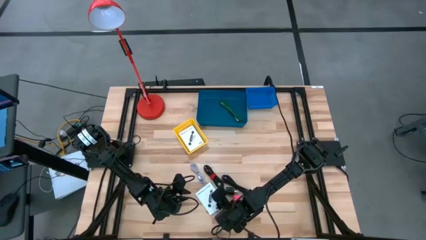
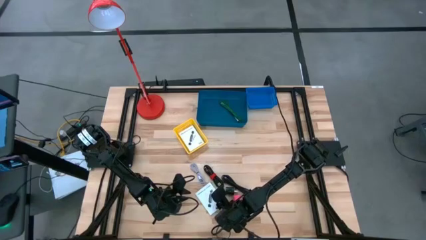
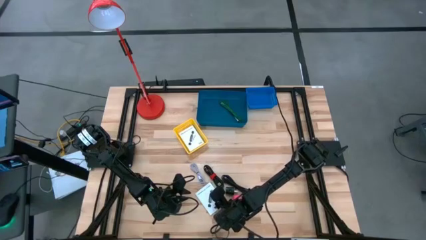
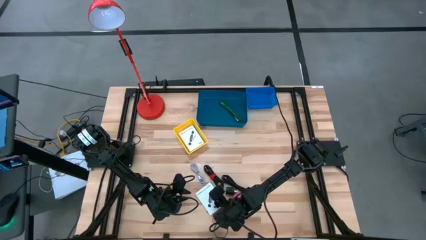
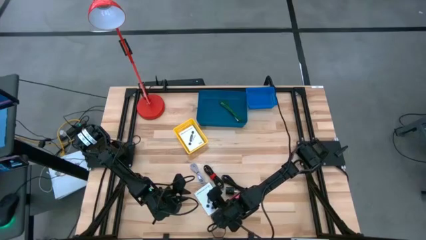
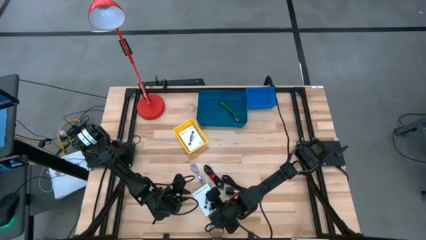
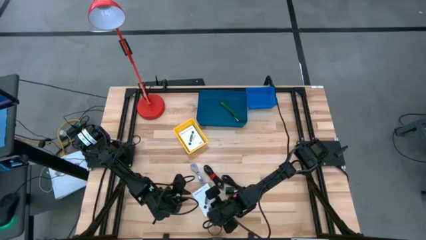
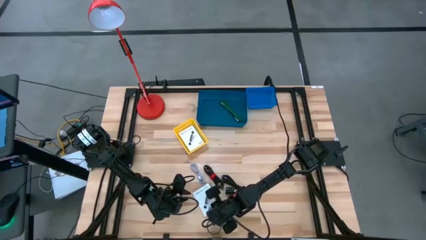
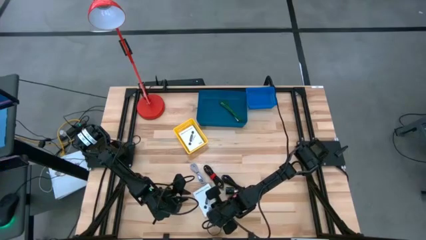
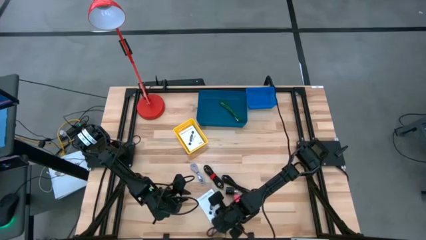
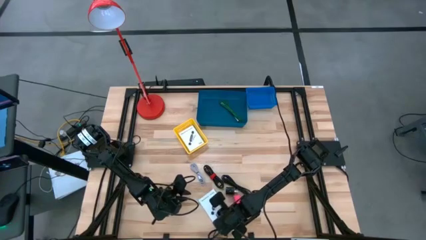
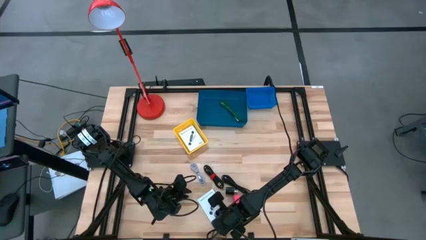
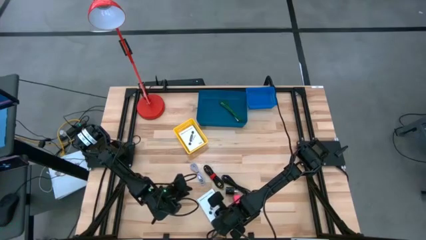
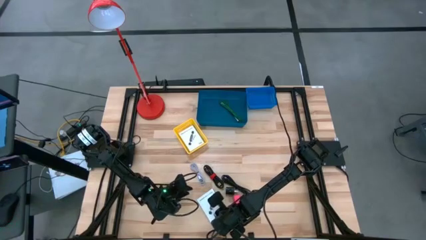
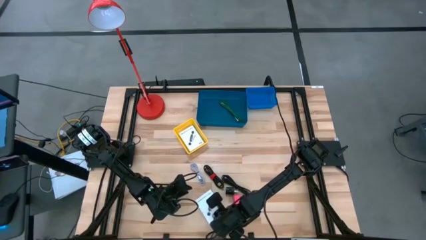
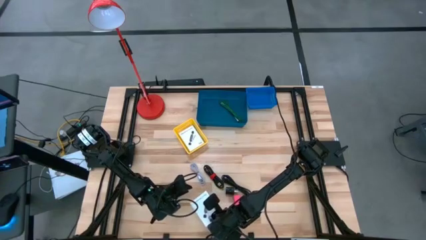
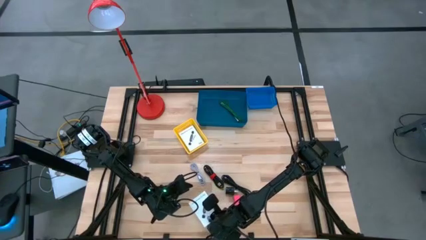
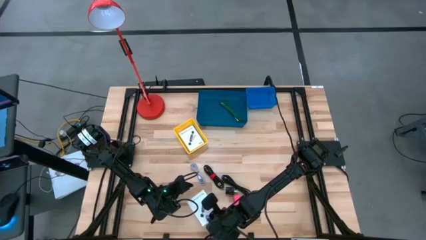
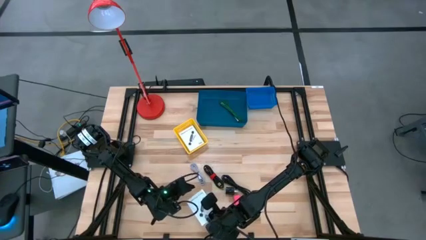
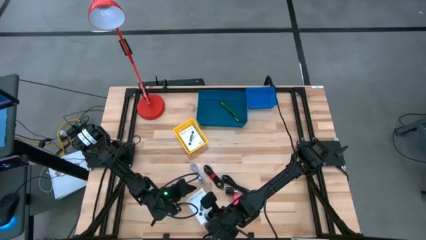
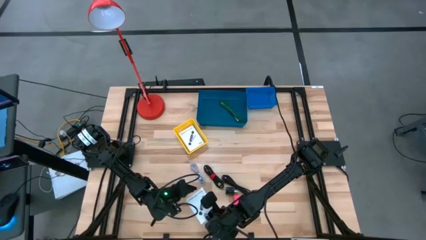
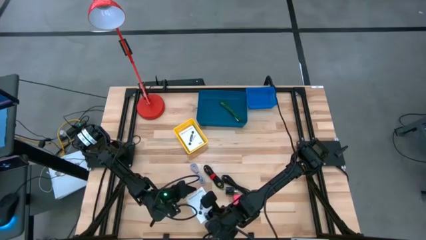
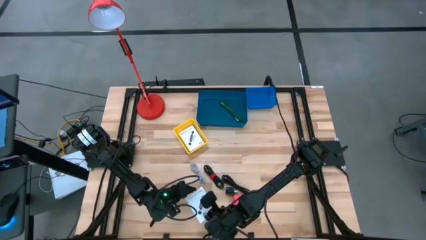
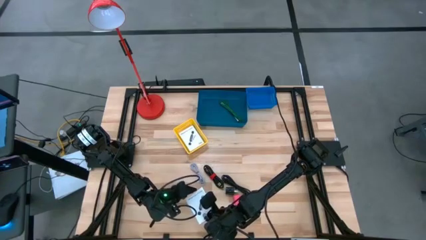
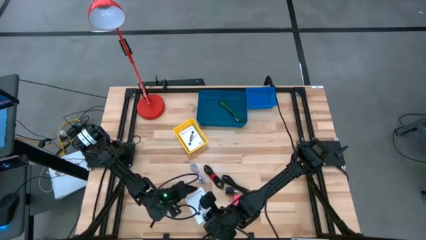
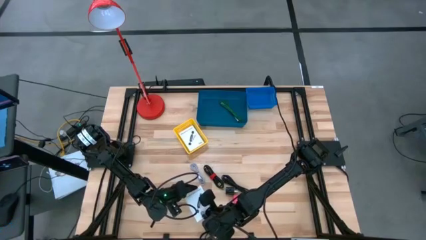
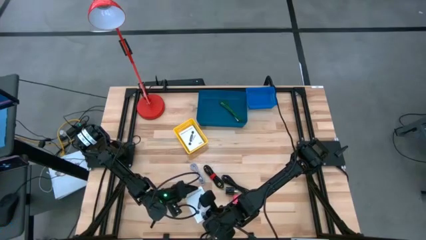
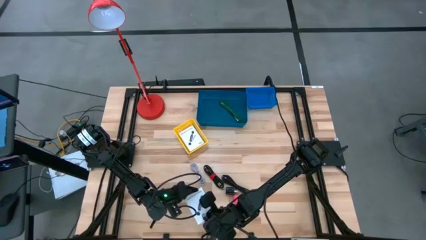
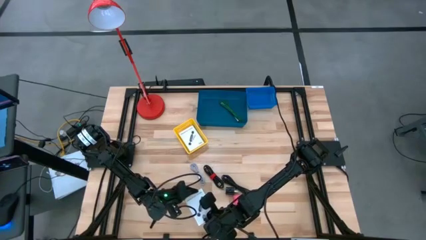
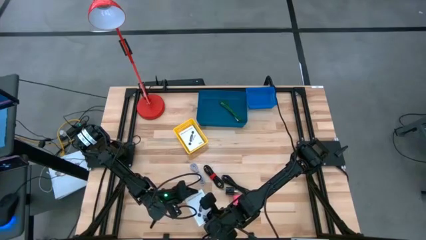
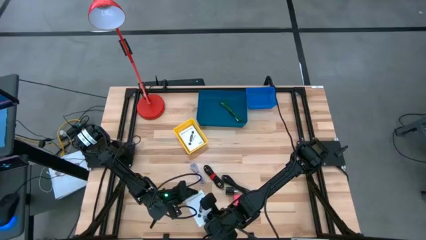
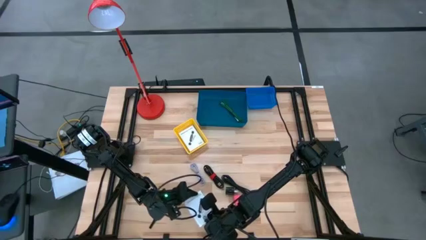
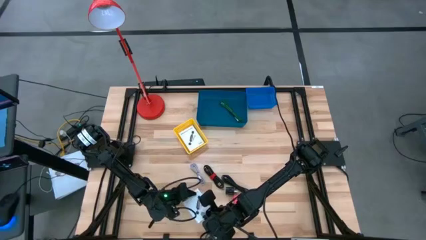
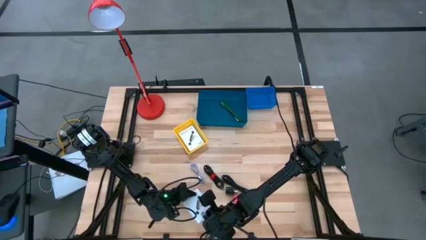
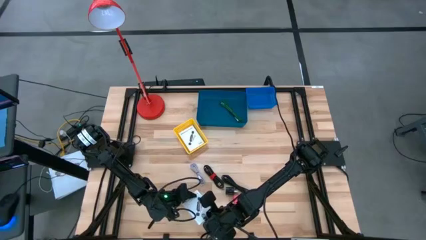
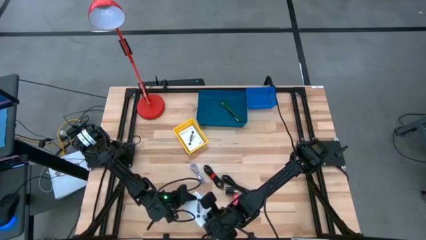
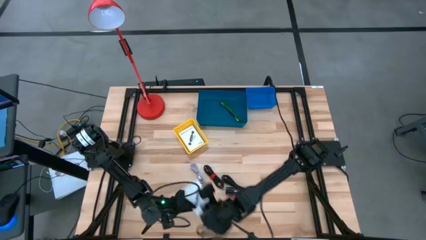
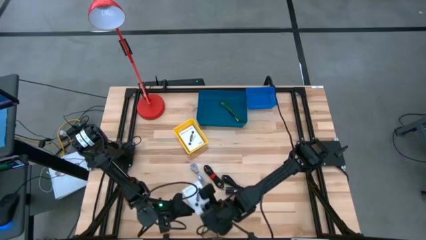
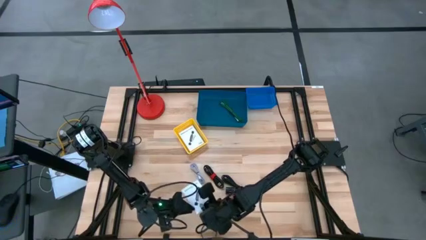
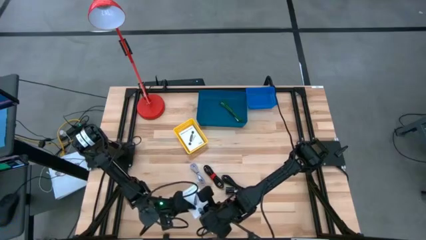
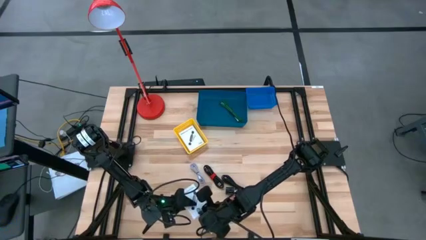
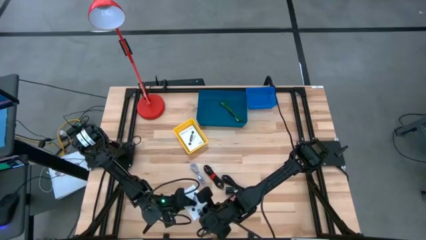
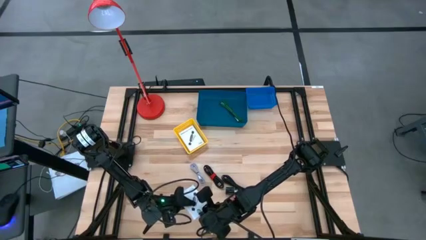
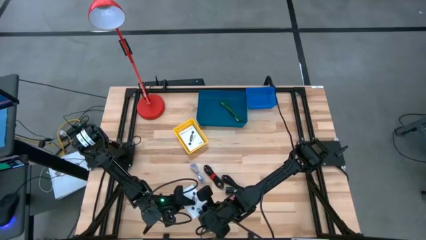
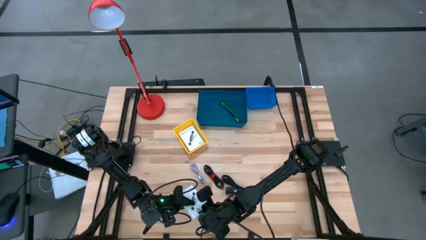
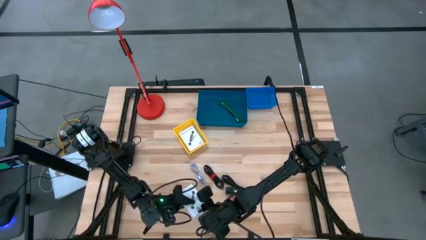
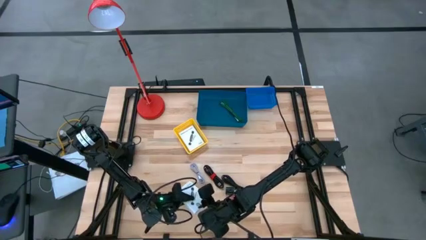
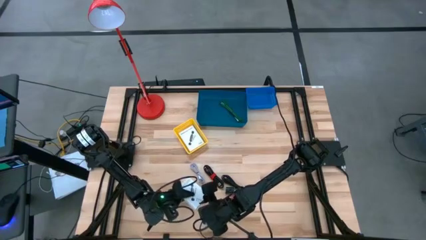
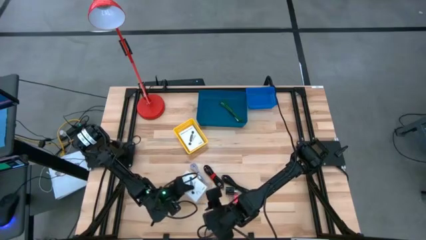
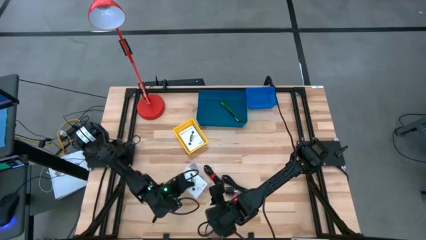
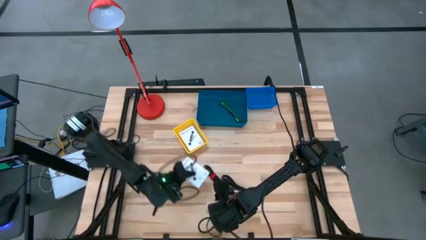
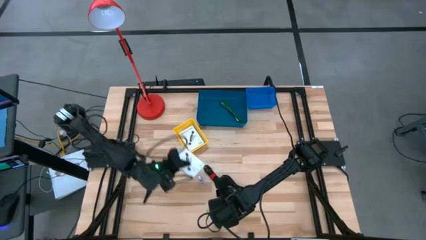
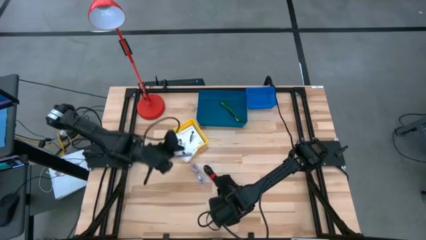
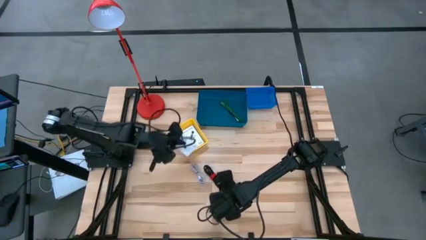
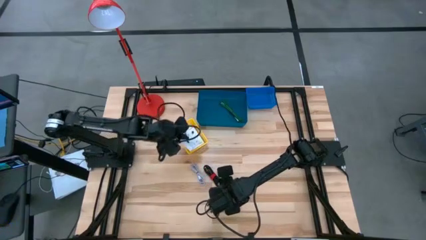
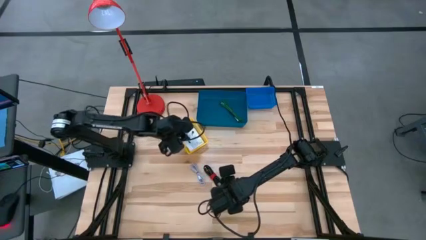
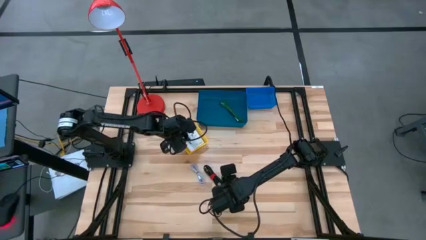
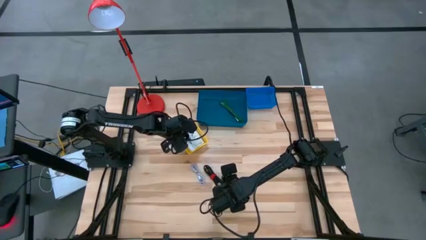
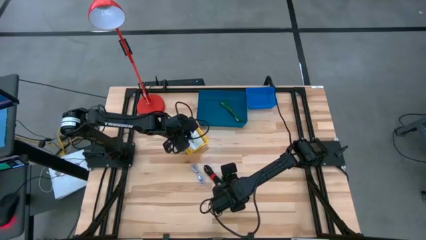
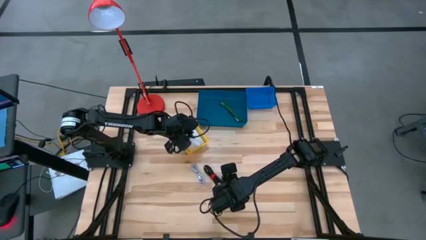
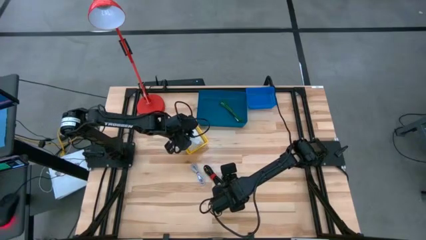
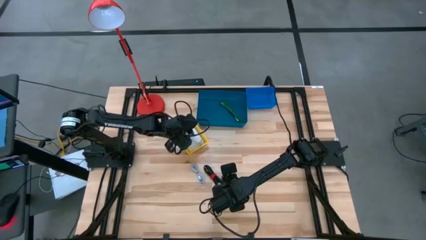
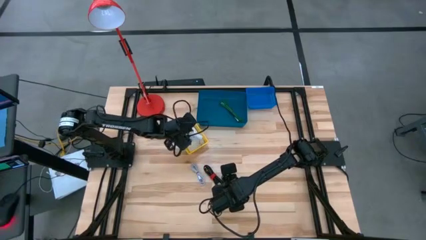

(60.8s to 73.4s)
Task: Pick and place items into bin
Put the white card reader box into the yellow bin

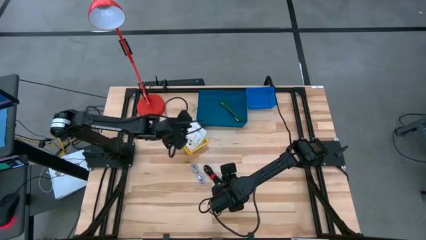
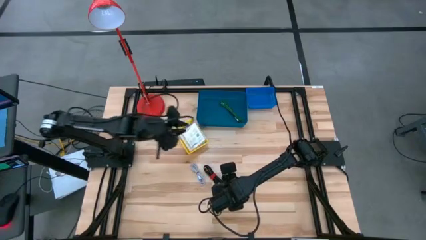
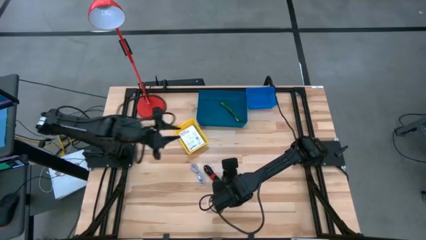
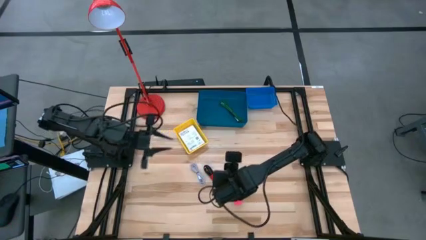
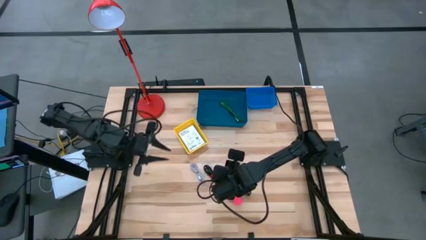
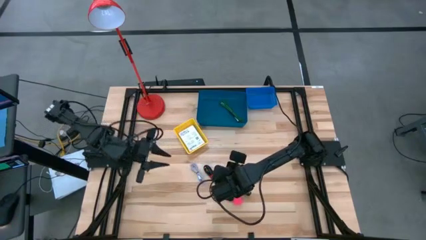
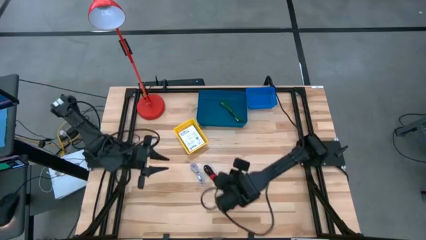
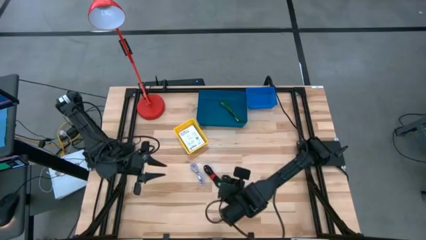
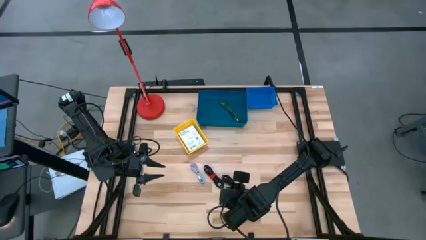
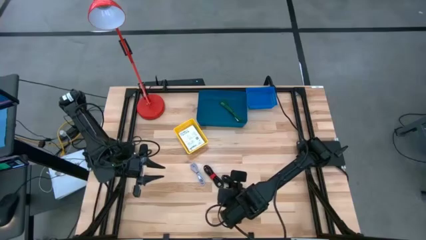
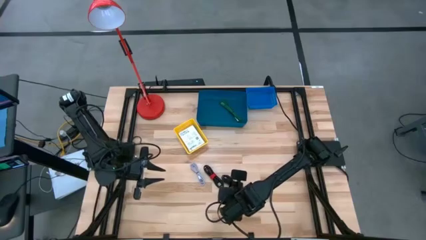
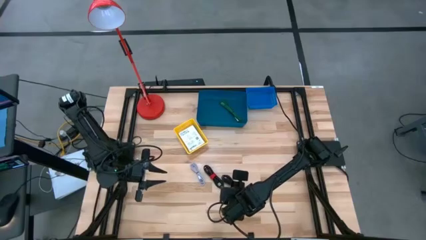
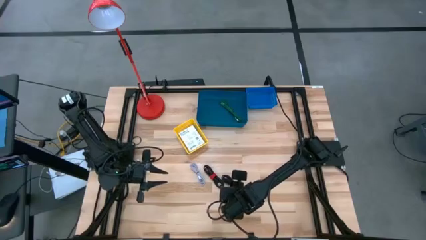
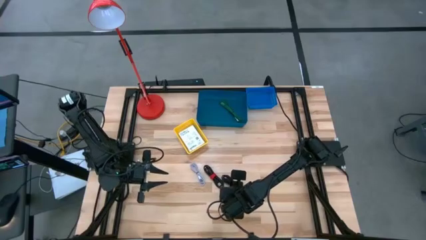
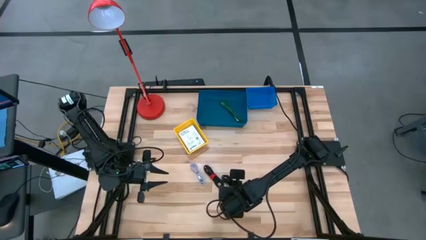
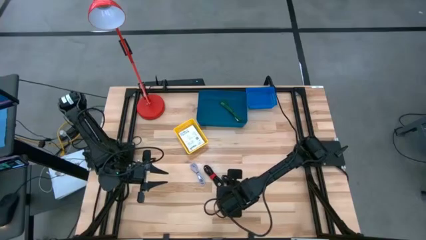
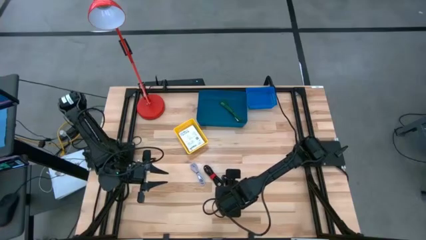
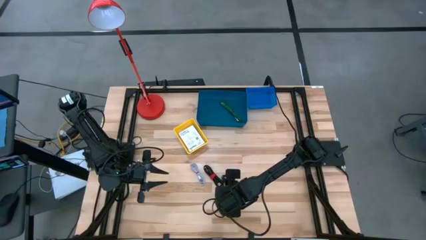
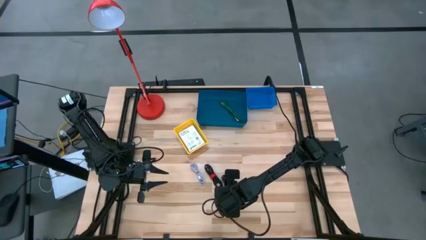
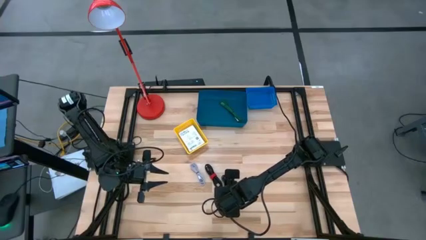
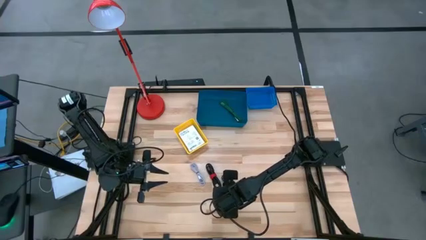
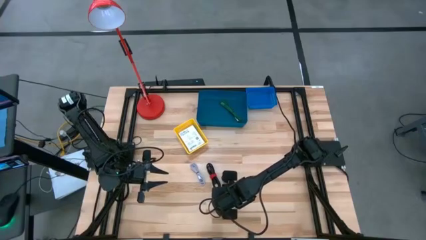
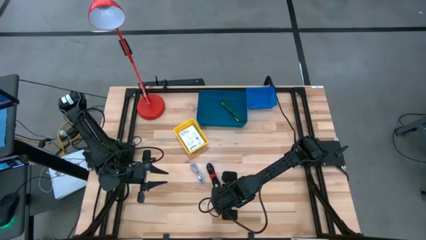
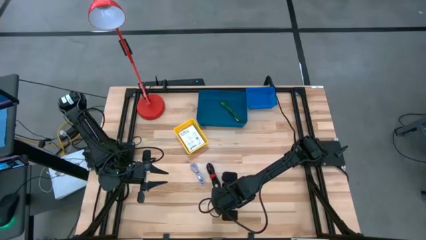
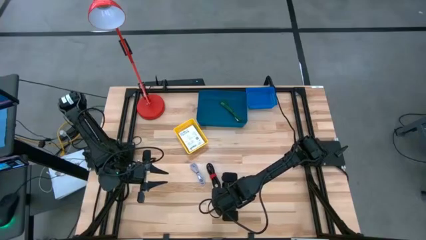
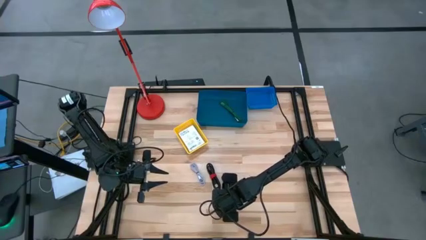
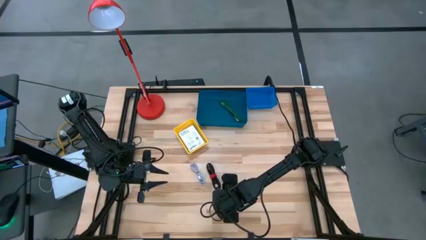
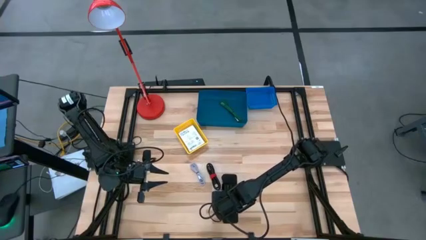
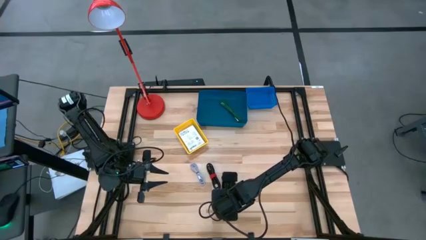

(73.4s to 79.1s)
Put the black charger adapter into the blue bin
